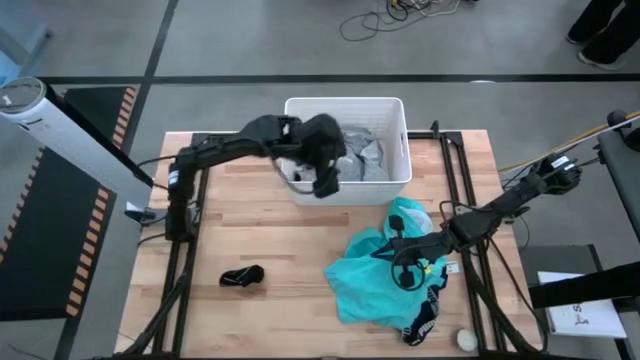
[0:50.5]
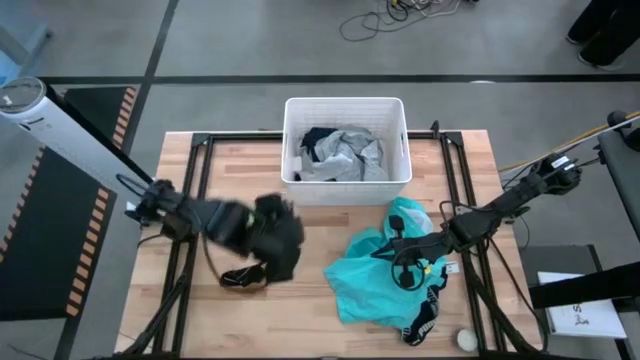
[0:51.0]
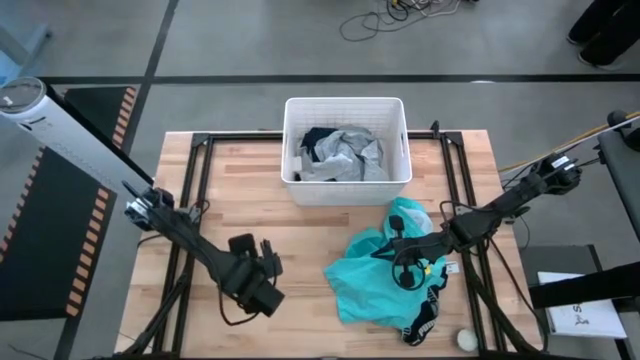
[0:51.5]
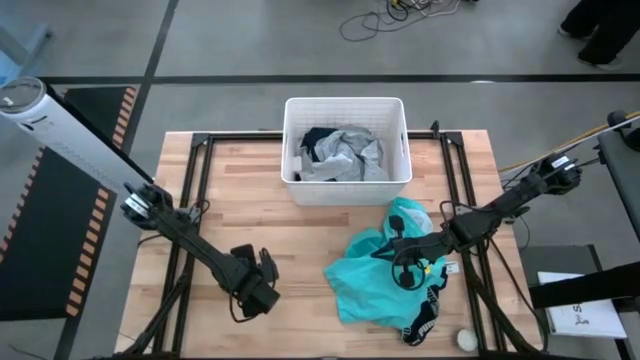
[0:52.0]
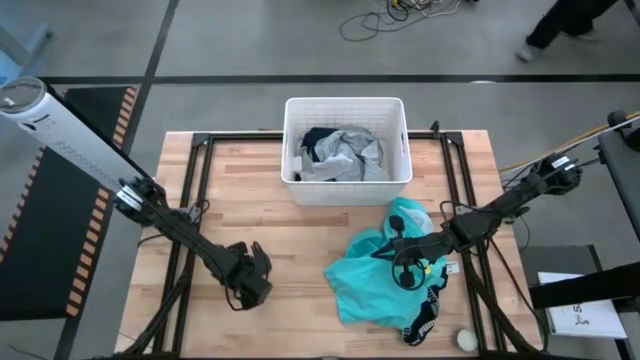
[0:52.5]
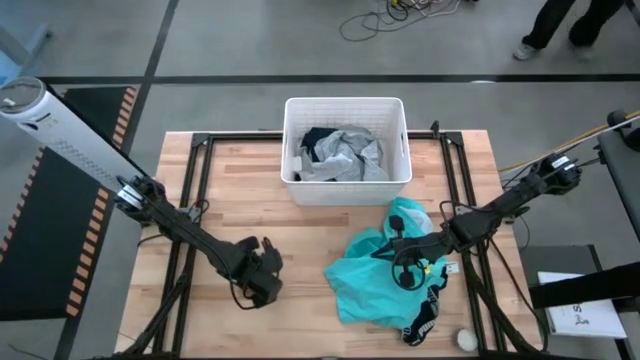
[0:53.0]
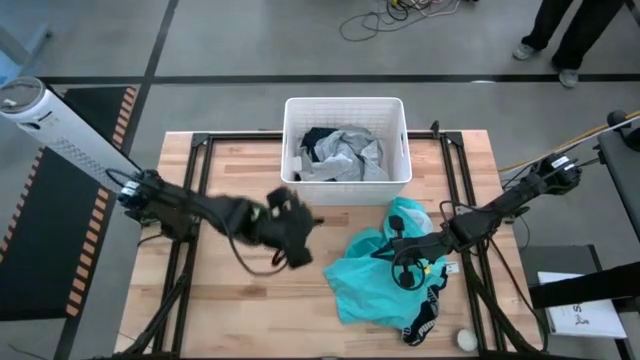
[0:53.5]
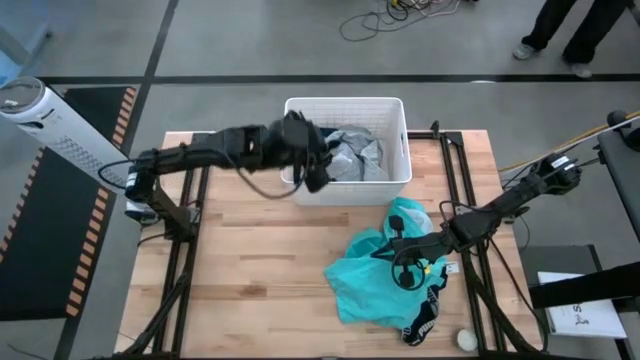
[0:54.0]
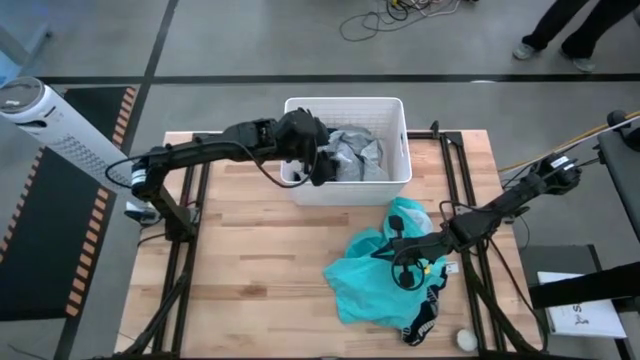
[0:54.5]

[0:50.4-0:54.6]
Task: Sort clothes
Put the black sock into the white laundry bin

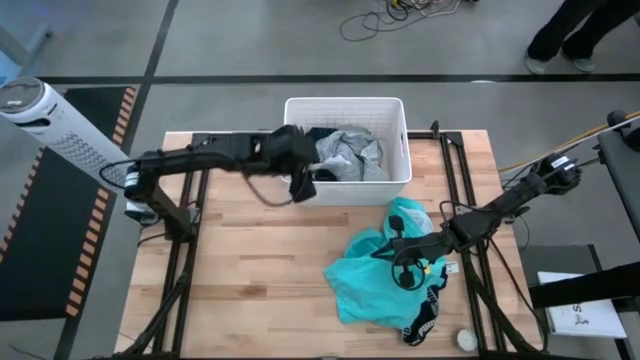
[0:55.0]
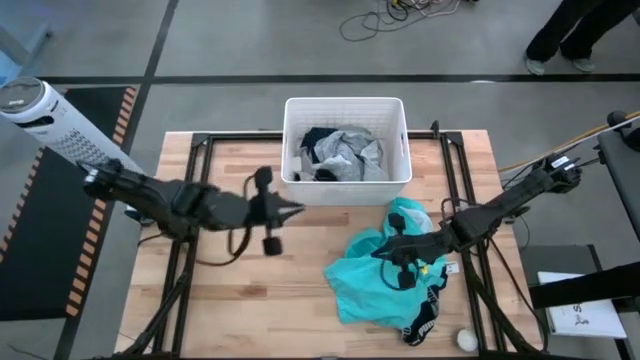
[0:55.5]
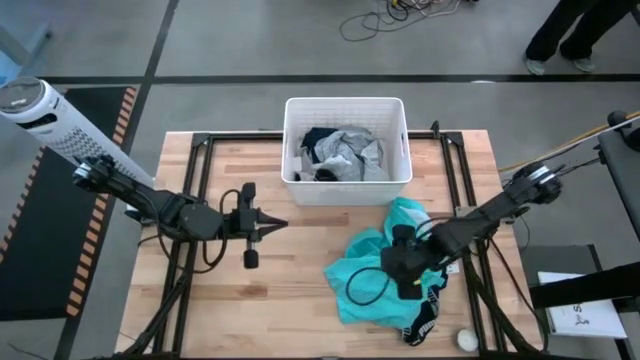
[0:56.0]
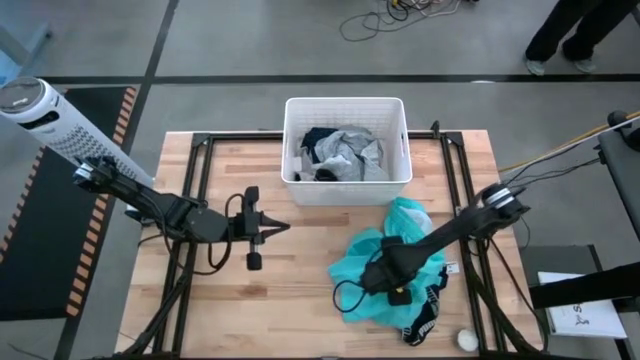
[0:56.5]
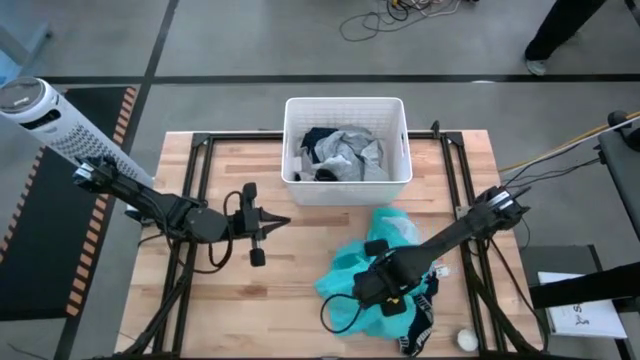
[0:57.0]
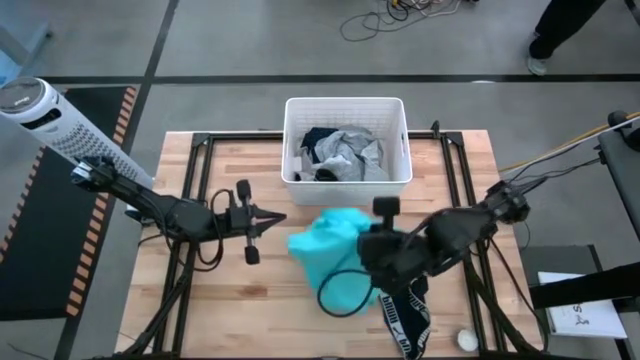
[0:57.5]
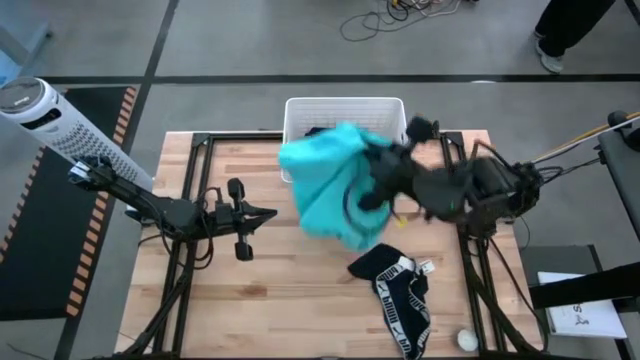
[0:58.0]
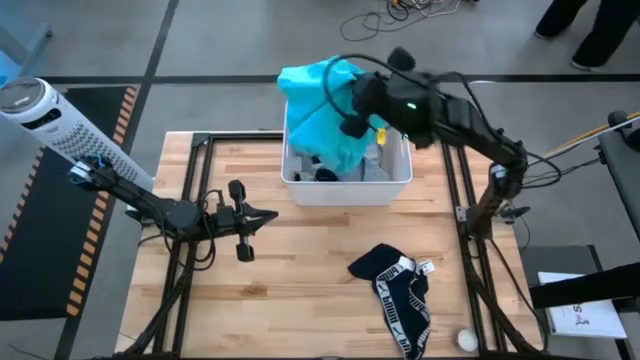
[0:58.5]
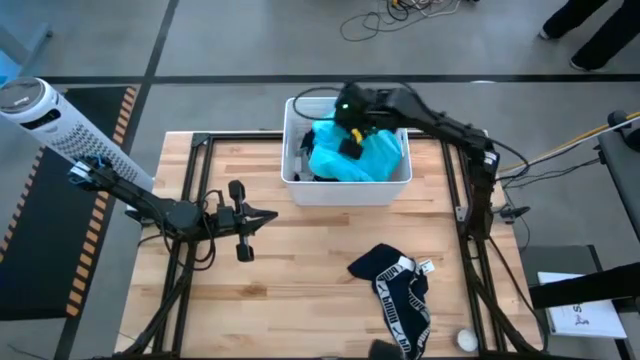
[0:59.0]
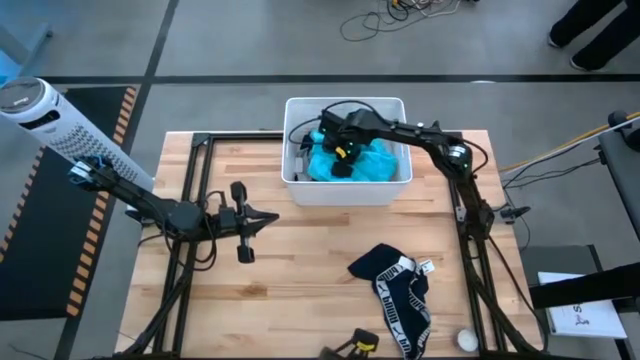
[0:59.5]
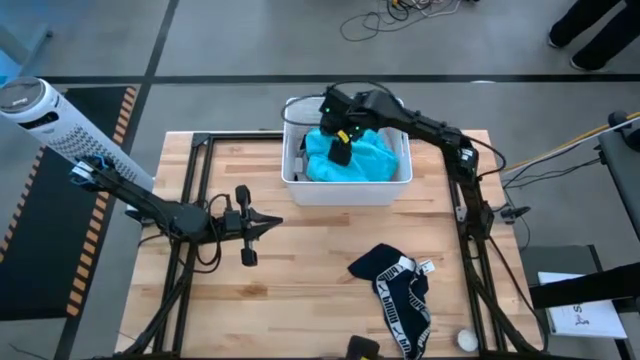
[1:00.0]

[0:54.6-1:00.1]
Put the light blue shorts into the white laundry bin

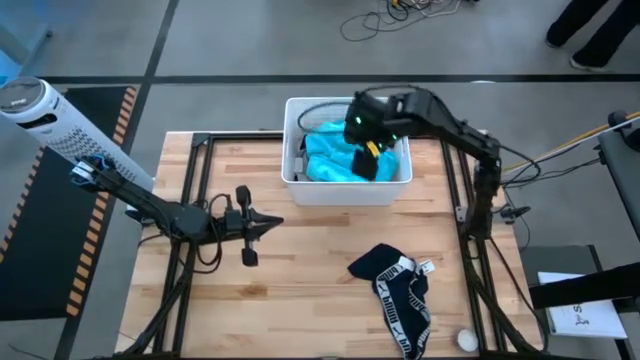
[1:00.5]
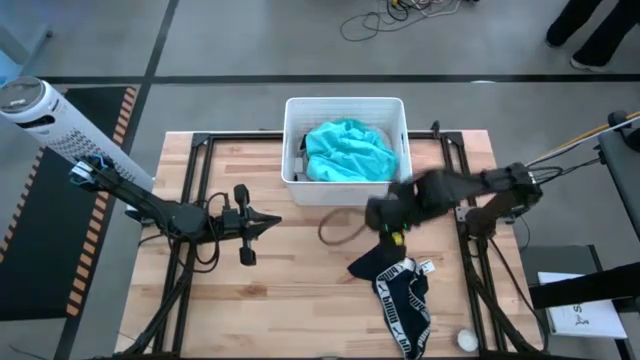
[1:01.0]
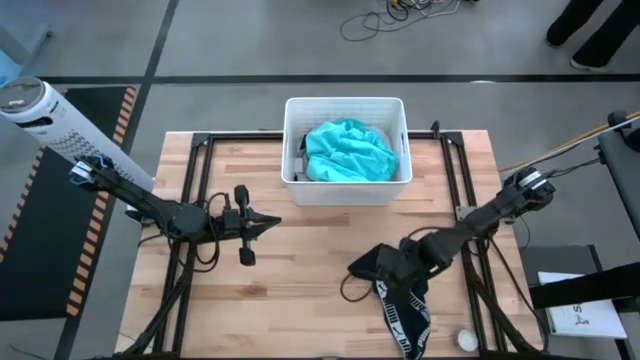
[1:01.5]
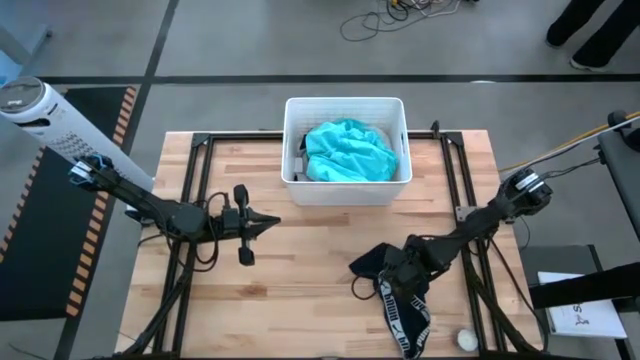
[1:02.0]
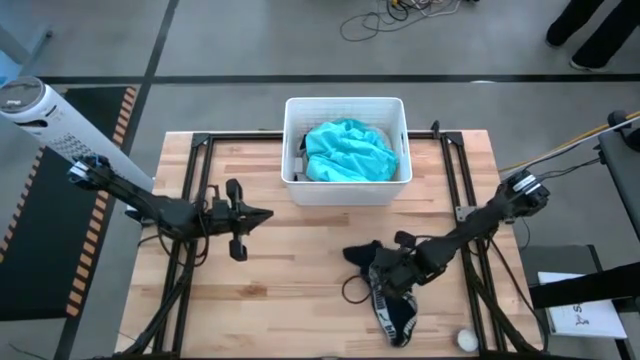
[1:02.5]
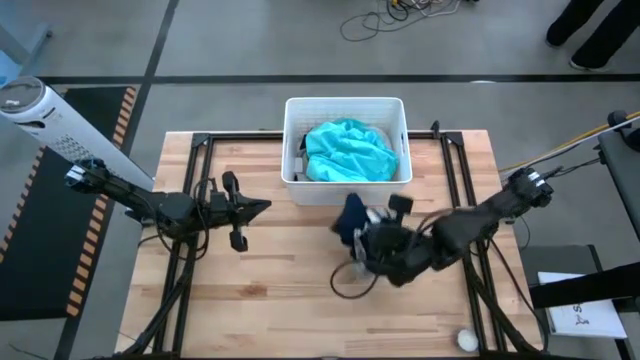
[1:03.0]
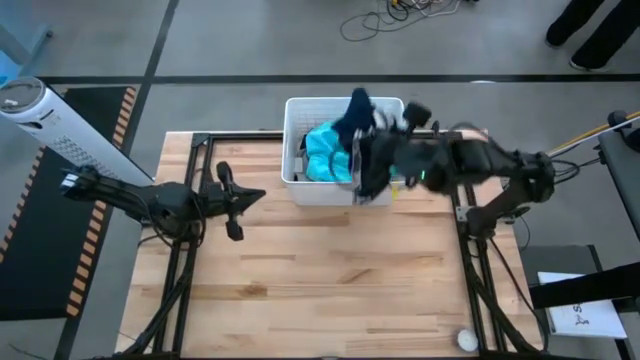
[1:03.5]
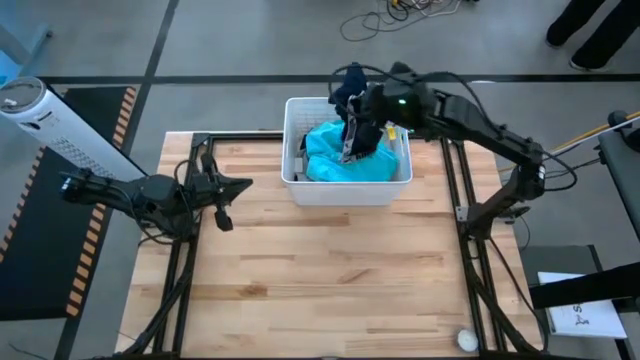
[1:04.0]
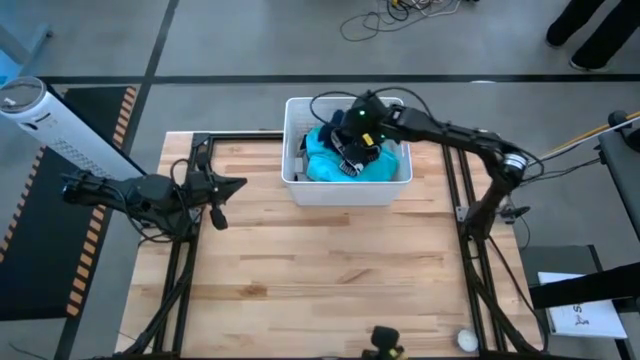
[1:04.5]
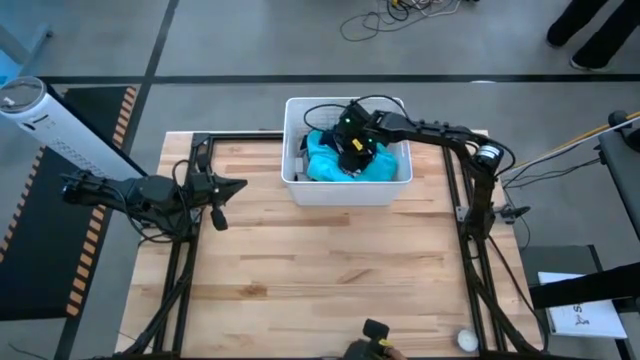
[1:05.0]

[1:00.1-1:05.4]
Put the black underwear into the white laundry bin

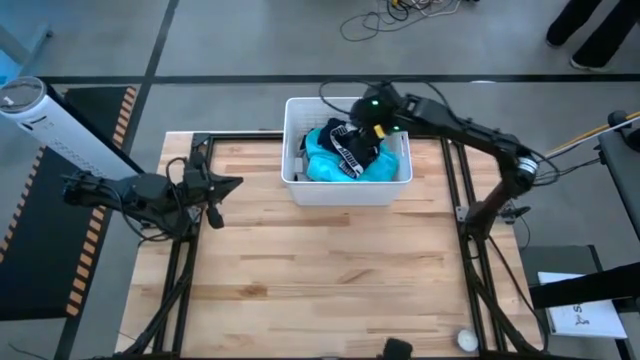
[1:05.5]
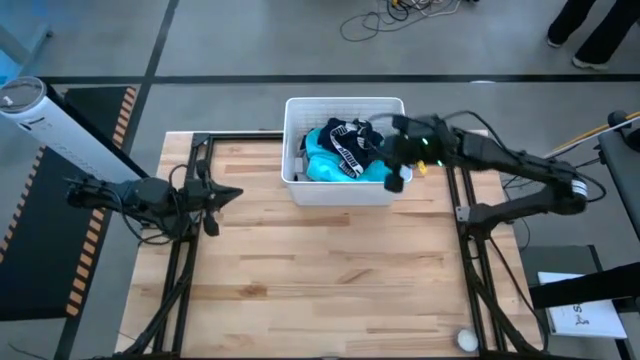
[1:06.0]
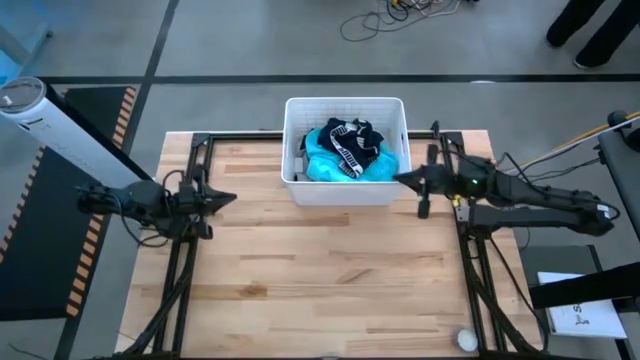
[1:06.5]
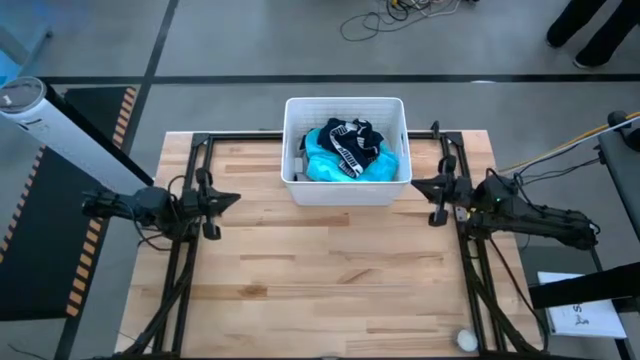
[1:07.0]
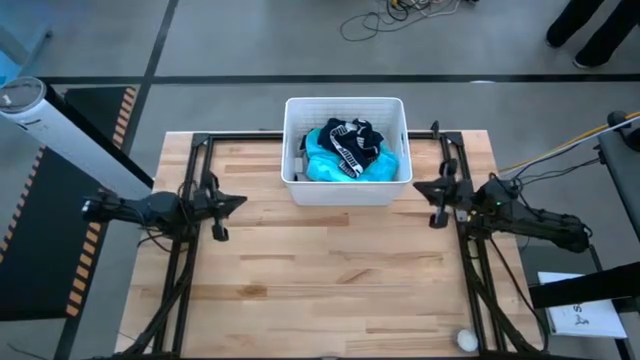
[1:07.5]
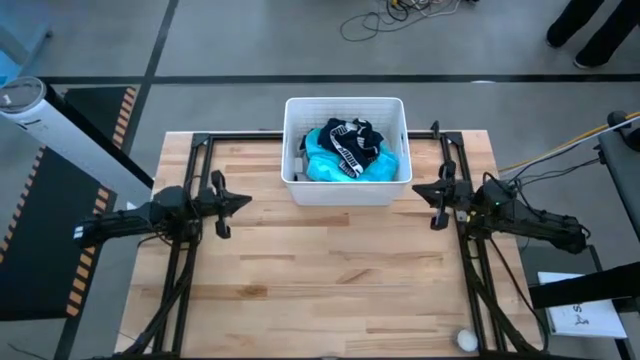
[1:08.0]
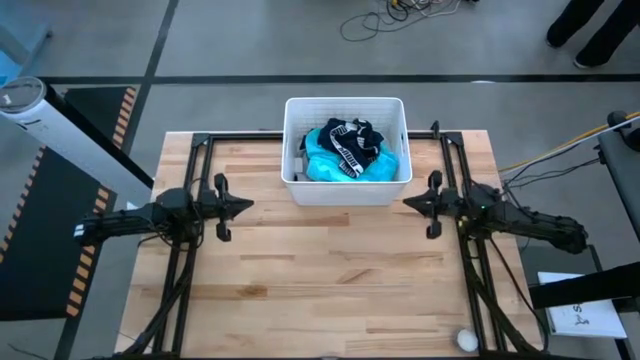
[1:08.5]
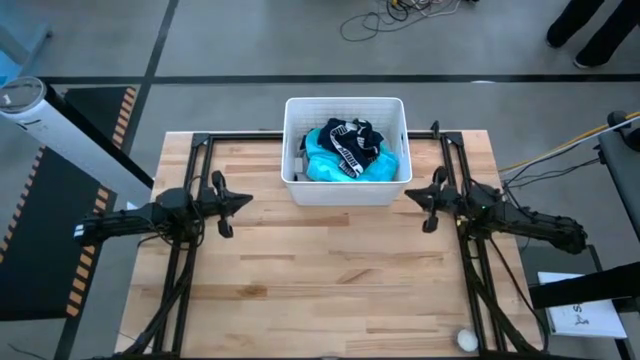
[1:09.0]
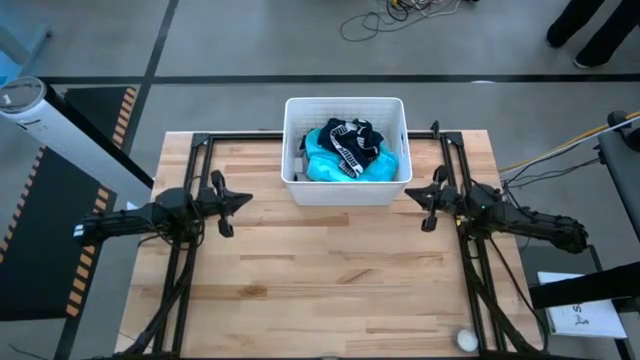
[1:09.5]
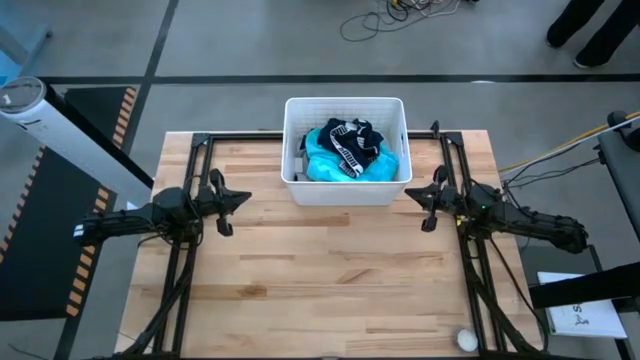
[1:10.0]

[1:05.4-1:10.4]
Return to Home Position

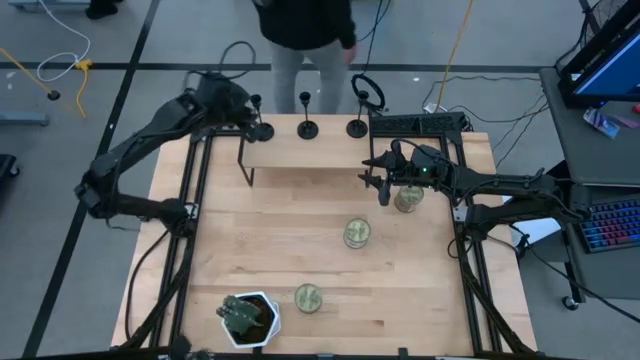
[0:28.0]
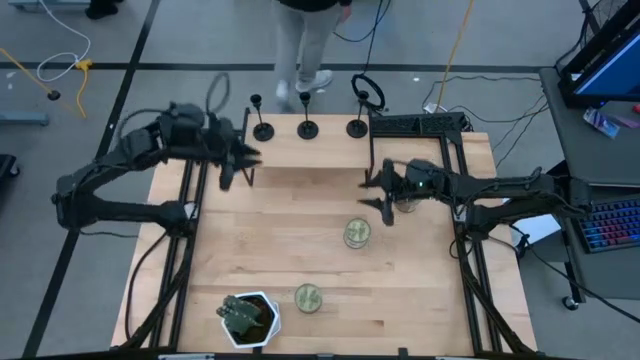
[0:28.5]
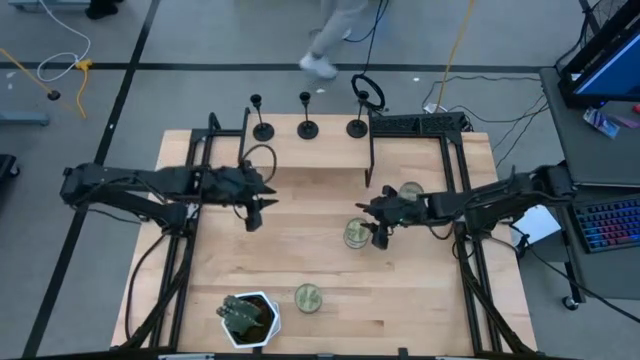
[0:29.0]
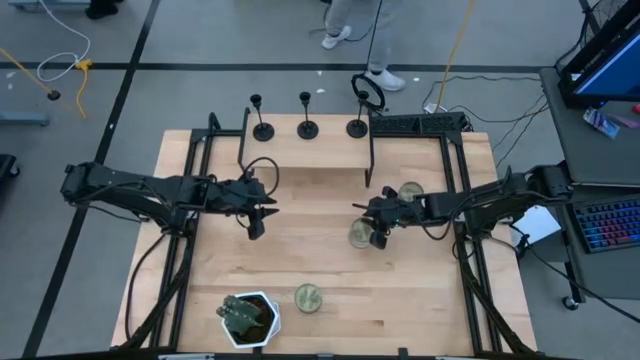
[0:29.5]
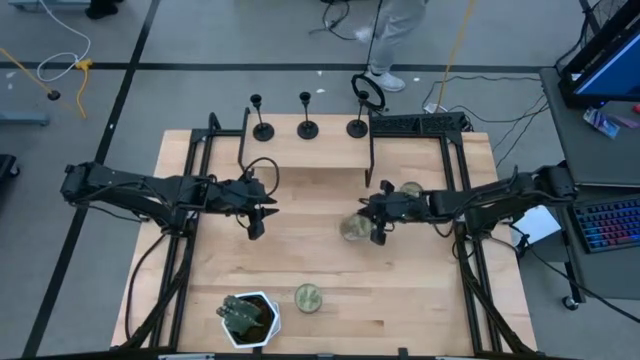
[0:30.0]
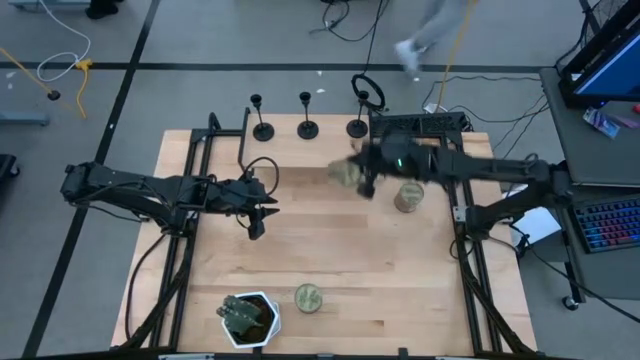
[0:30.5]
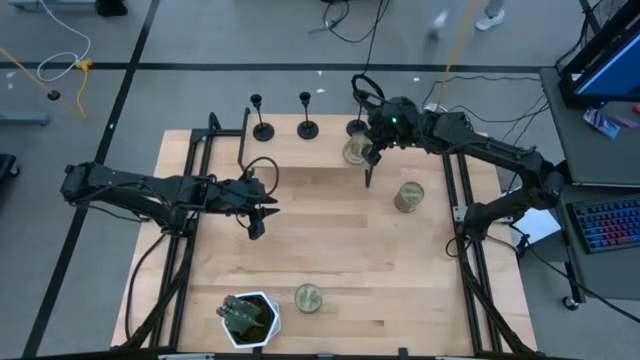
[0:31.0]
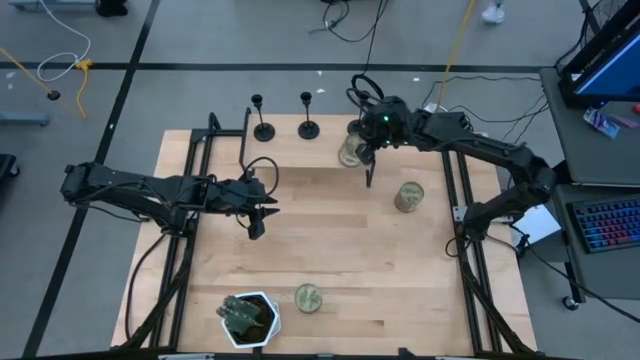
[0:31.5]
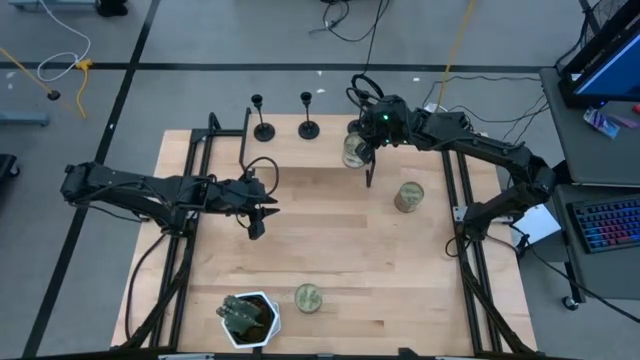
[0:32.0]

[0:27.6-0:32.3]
Task: Pick & Place candle stick holders
Put the middle scented candle on the shelf
